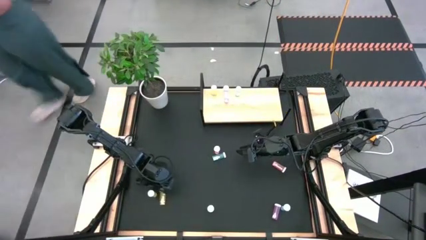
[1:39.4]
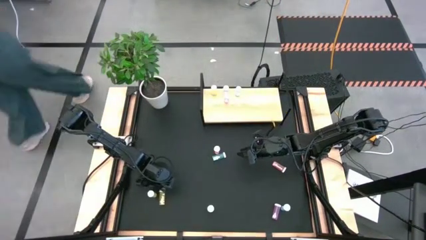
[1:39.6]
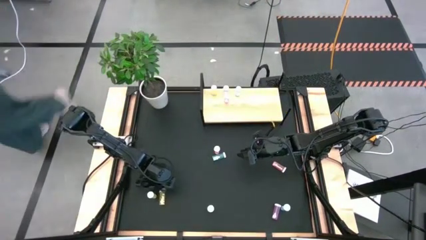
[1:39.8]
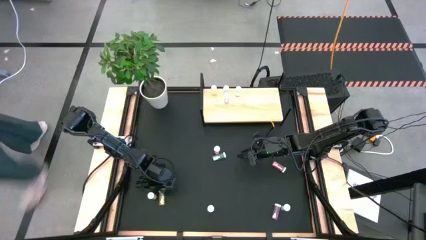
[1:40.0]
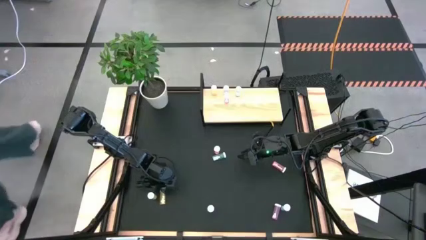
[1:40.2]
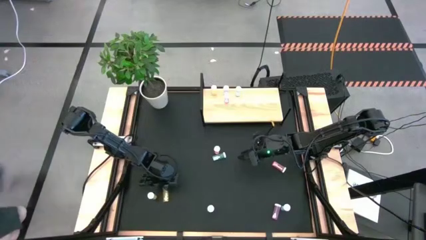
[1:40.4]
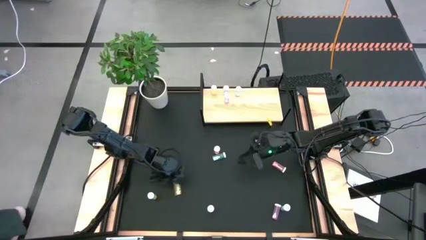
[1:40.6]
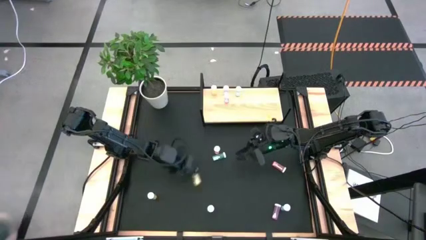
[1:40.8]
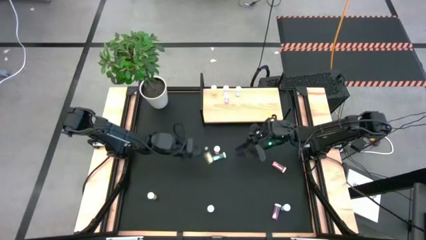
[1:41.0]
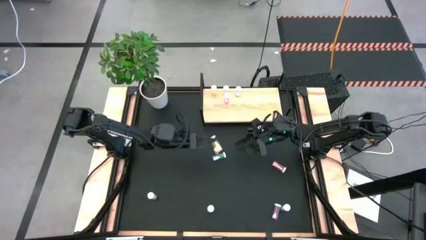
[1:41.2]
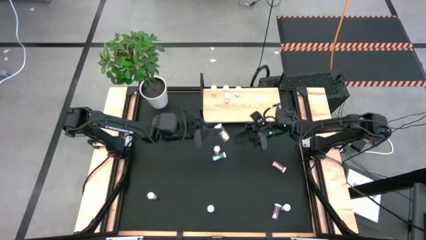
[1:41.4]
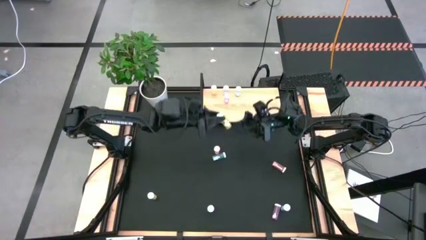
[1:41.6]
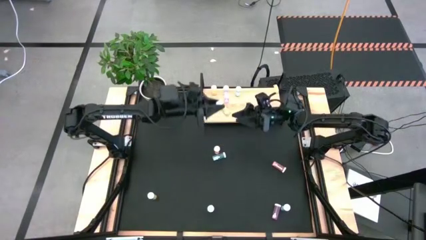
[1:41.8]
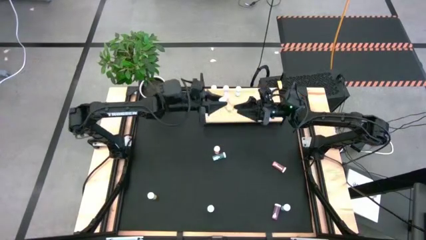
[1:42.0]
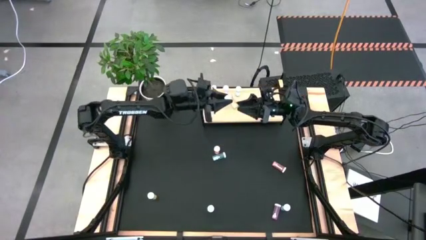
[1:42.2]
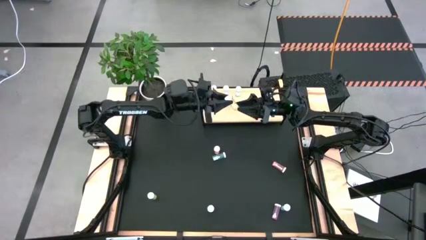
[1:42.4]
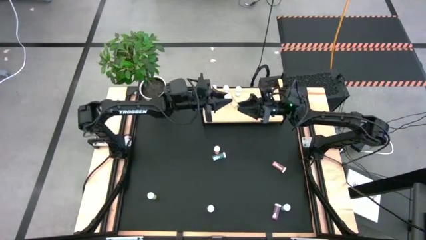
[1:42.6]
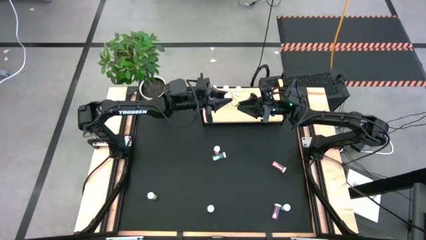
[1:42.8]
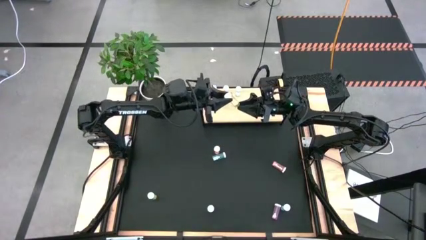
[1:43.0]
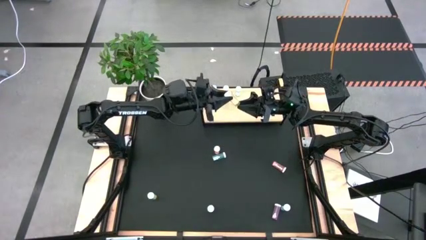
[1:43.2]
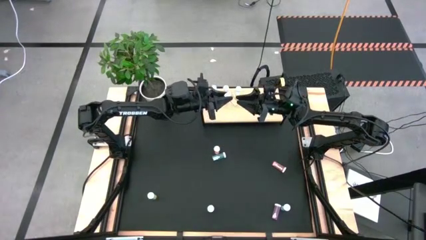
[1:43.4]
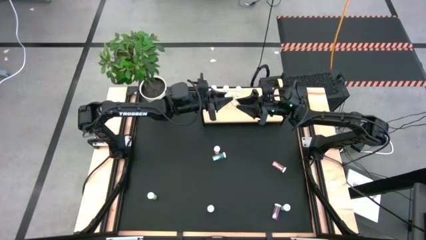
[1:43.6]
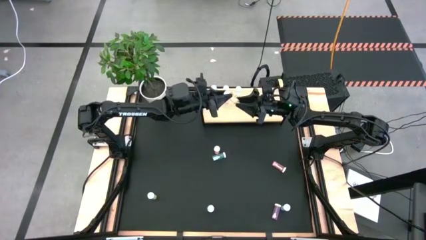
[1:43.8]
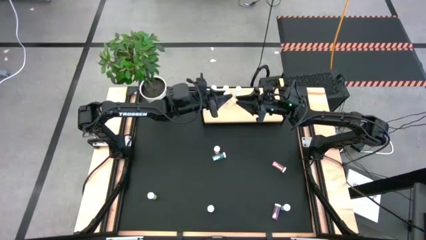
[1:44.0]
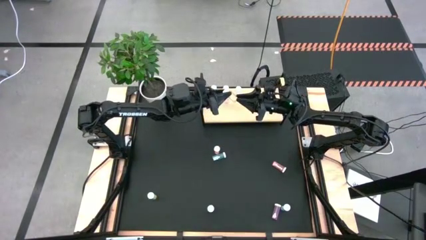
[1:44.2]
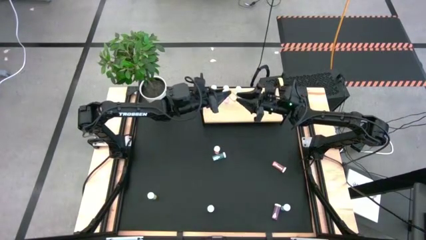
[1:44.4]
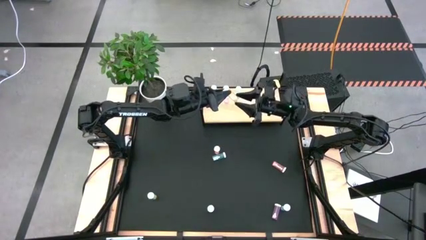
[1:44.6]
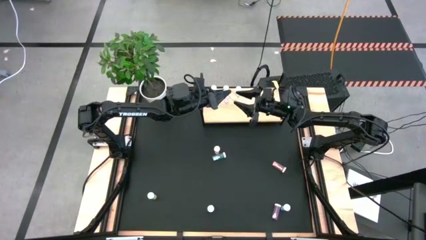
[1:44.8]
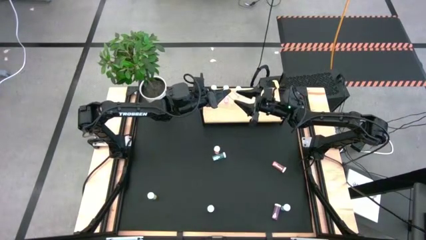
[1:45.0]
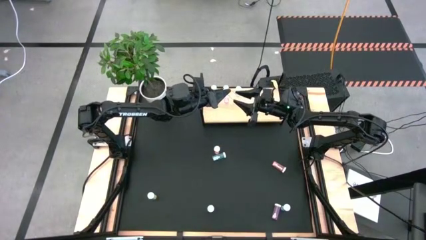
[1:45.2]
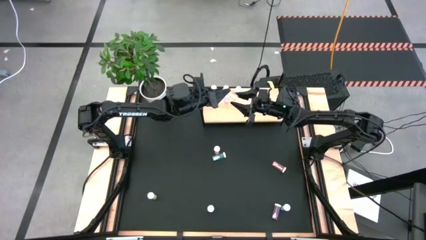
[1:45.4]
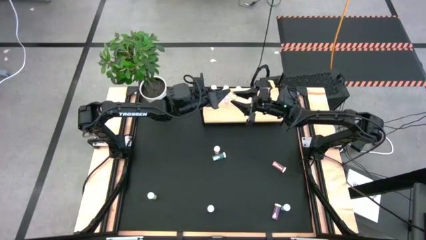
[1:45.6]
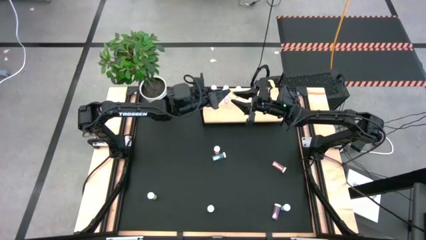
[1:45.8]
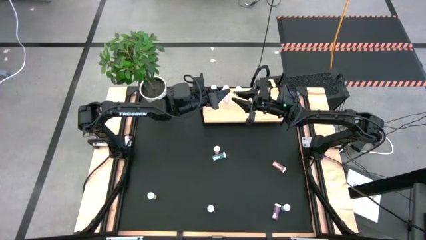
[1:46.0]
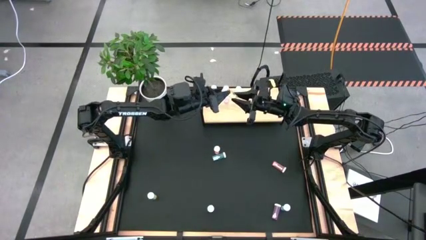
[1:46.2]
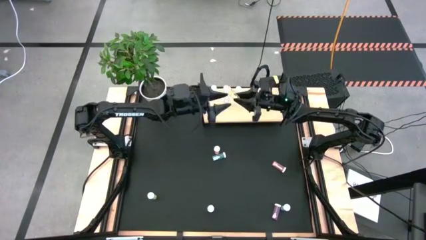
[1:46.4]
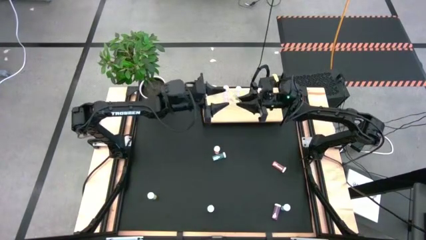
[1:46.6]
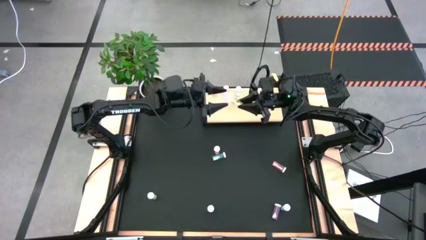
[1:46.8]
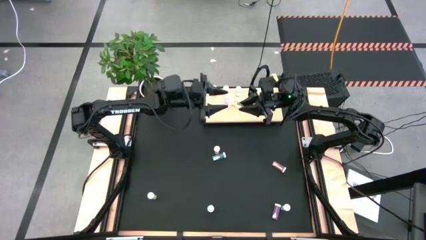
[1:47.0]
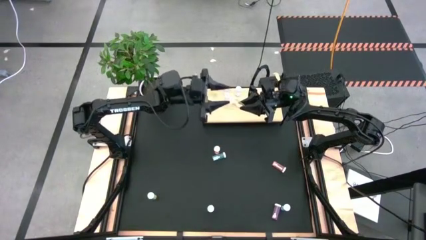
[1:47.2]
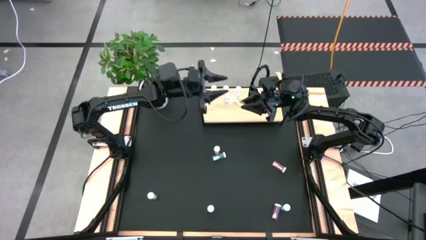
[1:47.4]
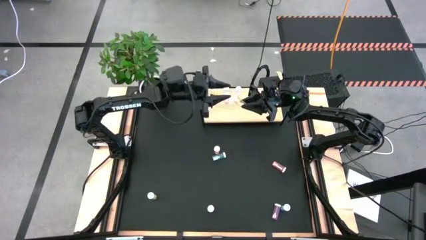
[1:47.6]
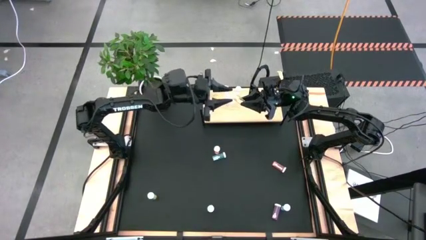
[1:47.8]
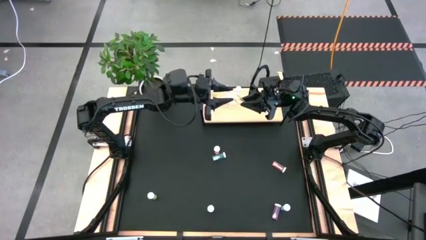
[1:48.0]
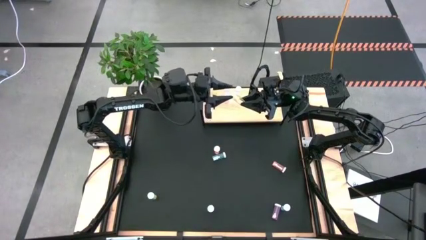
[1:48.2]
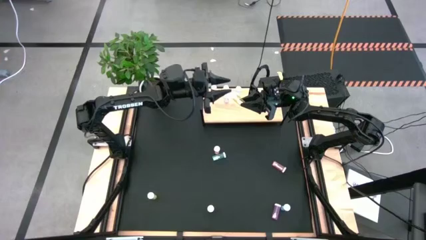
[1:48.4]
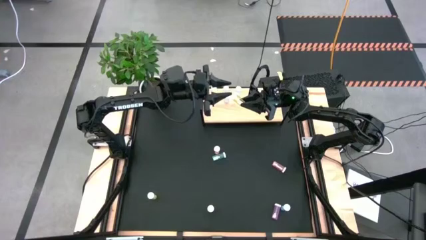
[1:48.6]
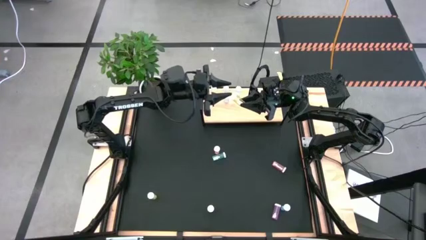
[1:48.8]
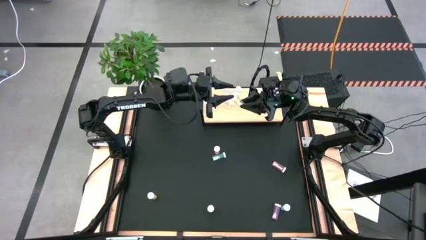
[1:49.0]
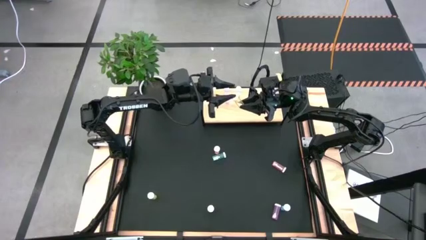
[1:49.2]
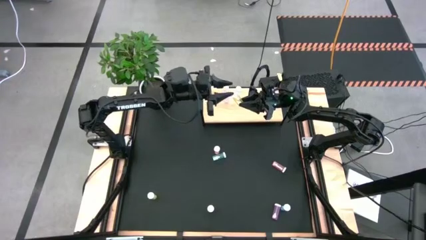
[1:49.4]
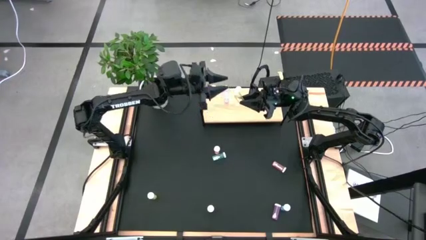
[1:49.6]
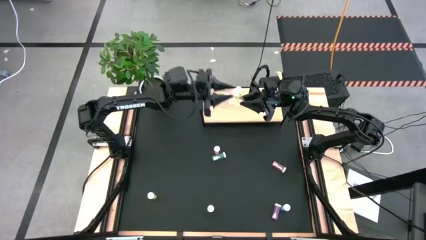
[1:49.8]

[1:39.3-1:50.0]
Task: Pick and place medicine bottles onto shelf by color
Put the right yellow pill bottle aligned with the other yellow pill bottle on the shelf

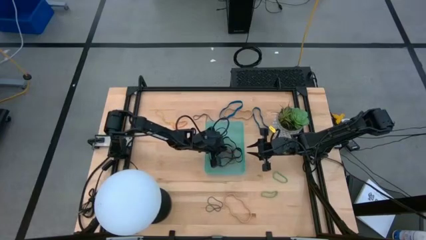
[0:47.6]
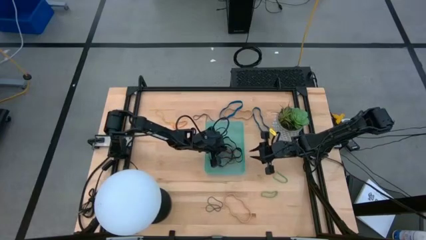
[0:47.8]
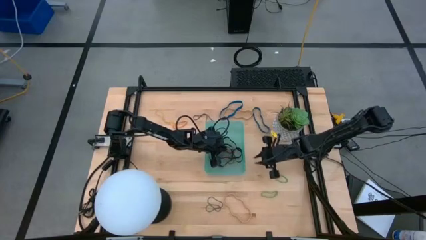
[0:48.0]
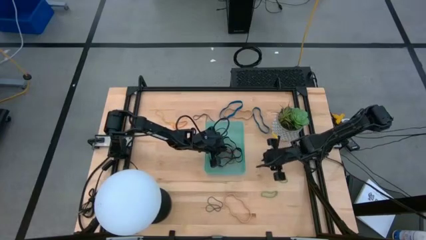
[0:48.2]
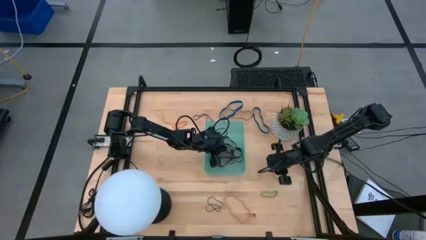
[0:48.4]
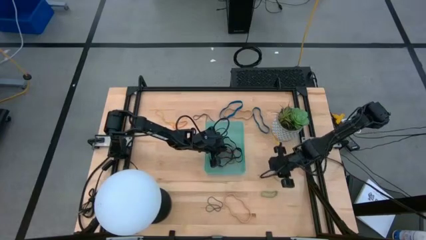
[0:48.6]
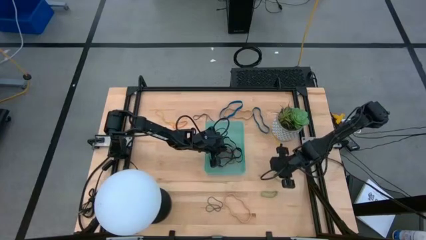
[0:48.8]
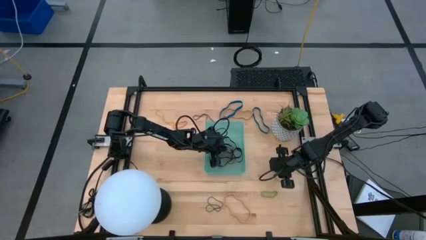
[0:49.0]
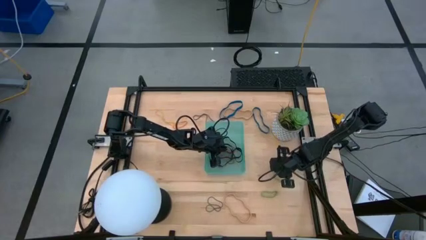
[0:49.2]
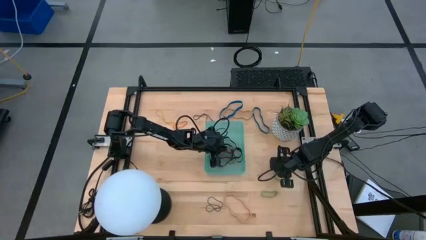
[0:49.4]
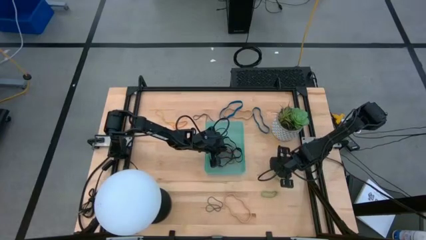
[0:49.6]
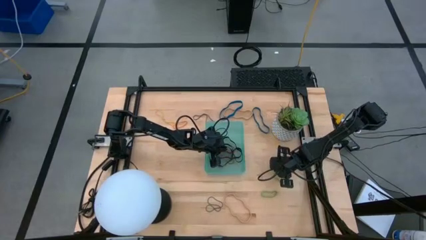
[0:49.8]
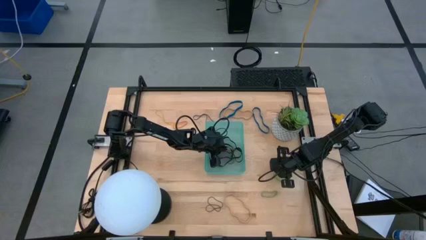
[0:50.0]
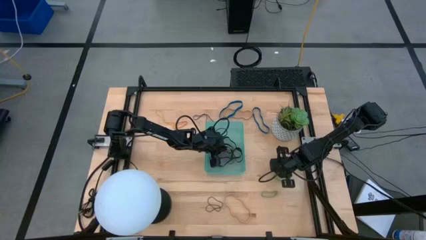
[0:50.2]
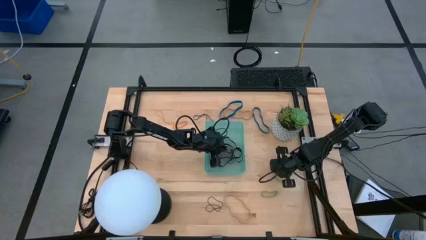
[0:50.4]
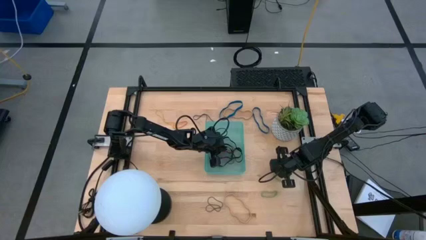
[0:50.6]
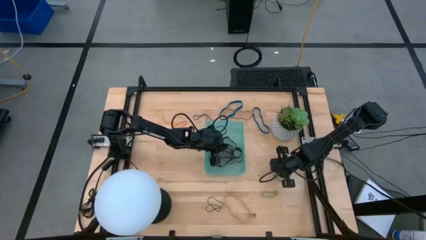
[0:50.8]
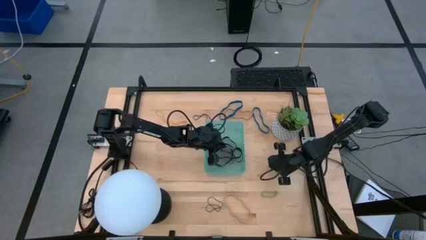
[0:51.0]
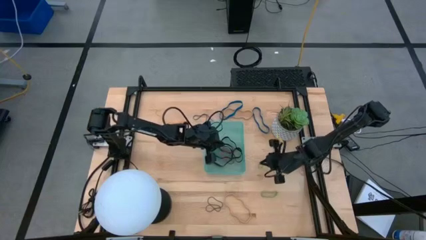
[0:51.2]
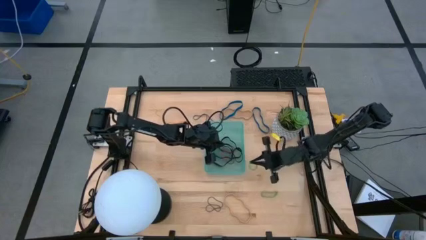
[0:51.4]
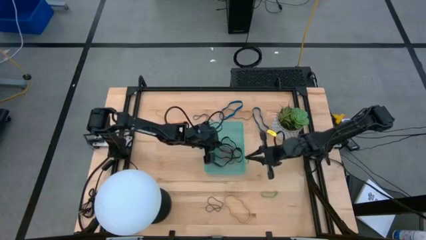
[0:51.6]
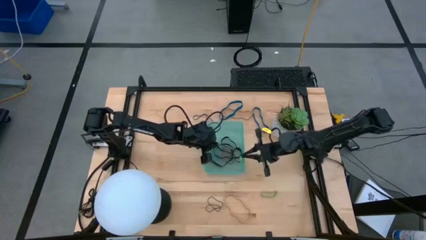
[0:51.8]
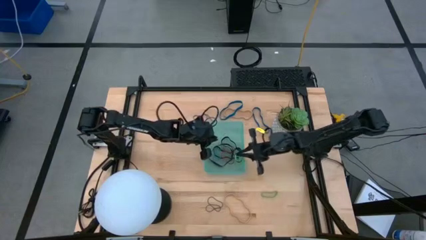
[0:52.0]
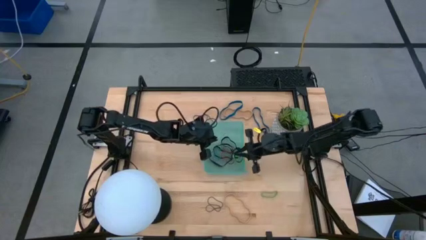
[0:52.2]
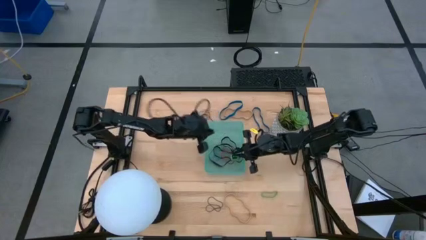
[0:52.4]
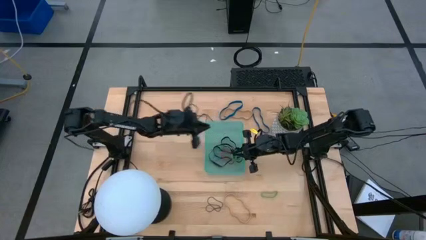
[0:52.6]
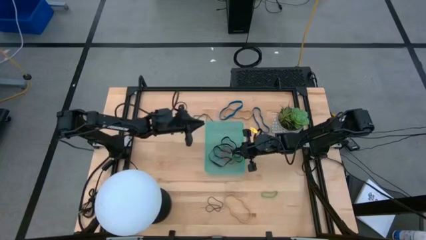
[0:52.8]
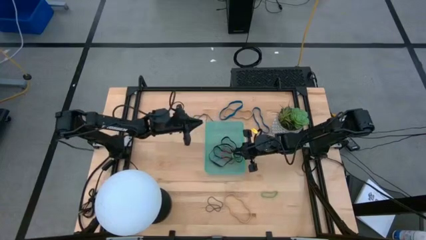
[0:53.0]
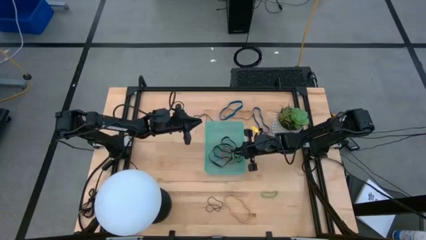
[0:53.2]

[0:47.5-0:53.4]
Task: Pick and place rubber bands into bin
Put the green rubber band into the green bin

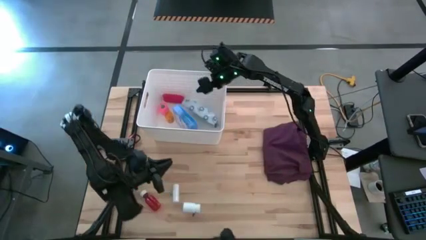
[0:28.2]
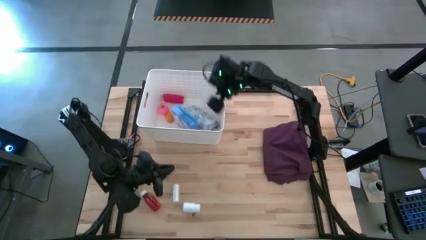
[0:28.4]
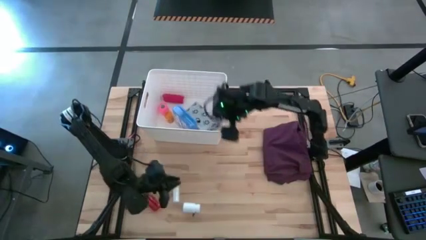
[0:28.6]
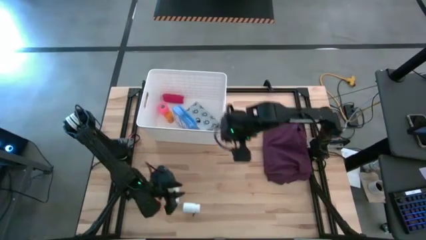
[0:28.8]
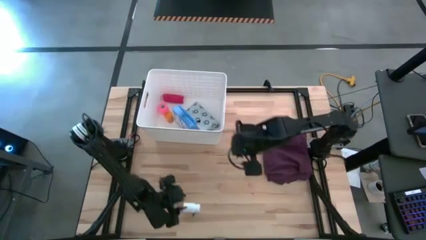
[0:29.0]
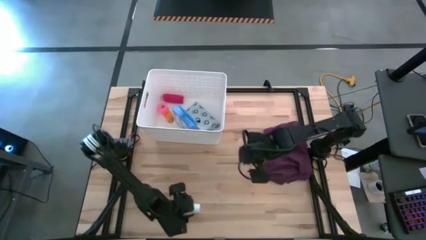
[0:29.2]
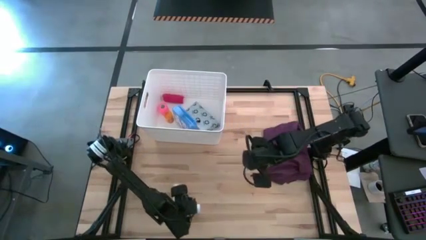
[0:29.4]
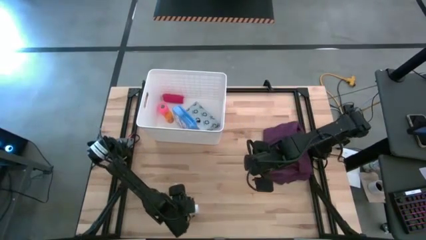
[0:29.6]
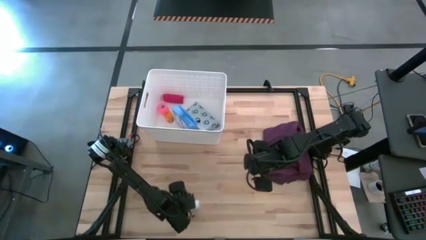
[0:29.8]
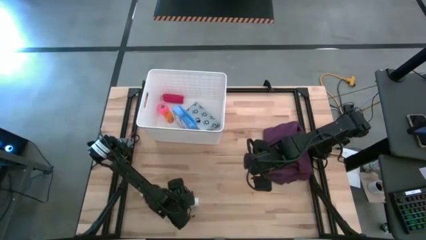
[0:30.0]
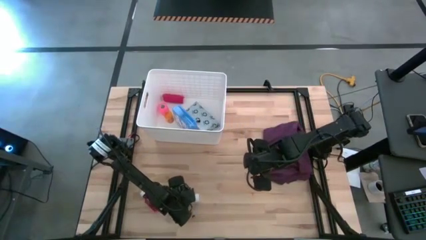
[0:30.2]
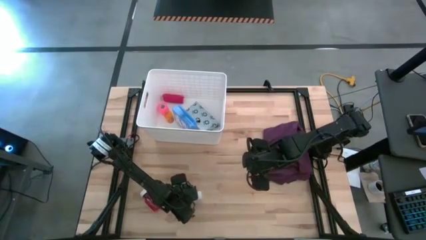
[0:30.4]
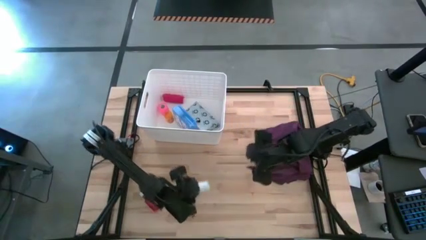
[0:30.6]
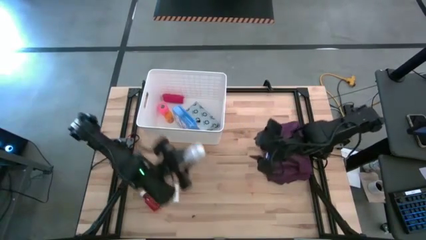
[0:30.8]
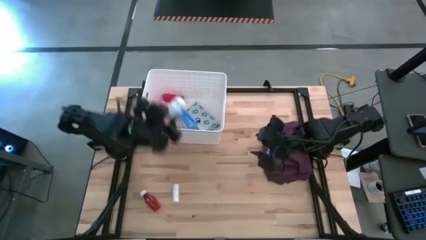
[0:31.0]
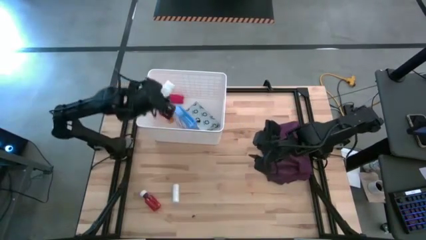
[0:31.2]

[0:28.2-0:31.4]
Task: Pick & place medical supplies in basket/bin
Put the white pill bottle into the white bin
